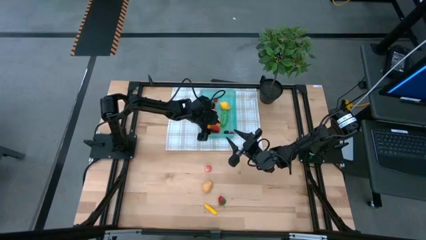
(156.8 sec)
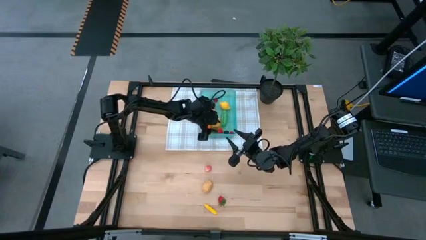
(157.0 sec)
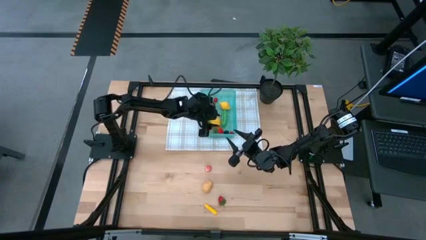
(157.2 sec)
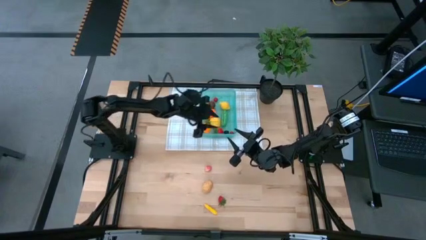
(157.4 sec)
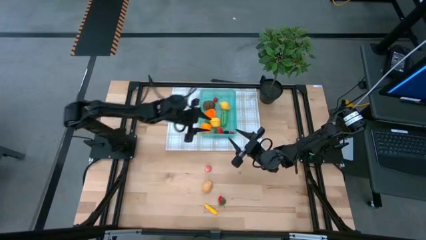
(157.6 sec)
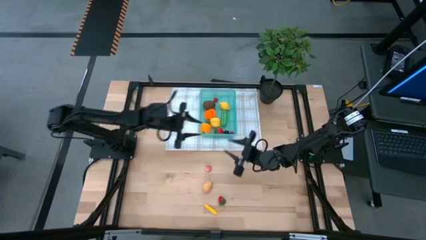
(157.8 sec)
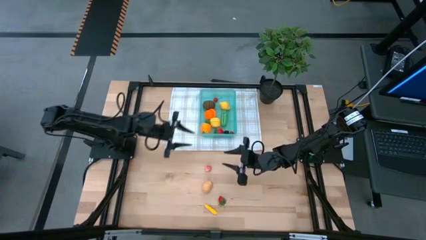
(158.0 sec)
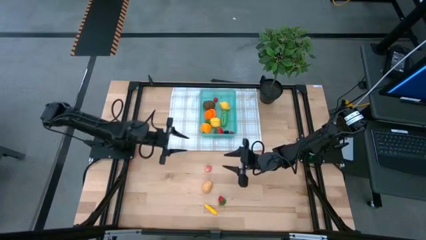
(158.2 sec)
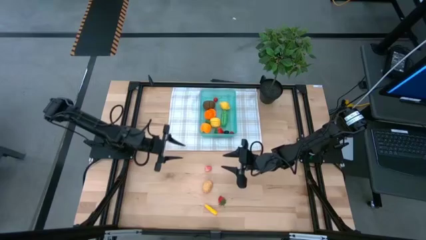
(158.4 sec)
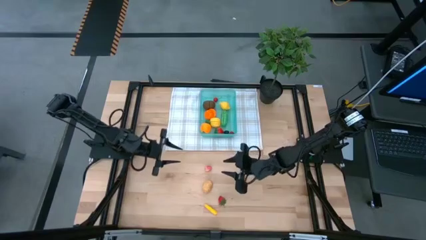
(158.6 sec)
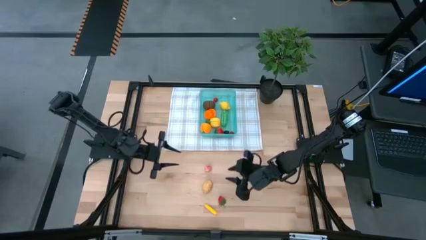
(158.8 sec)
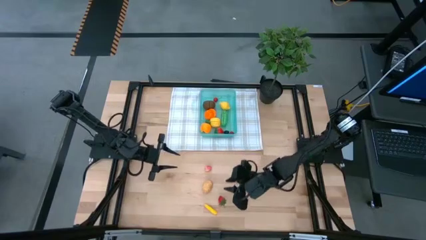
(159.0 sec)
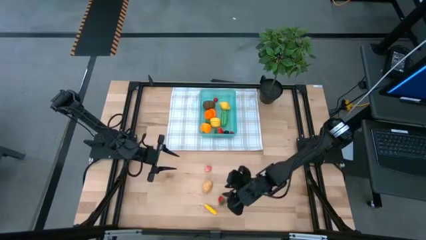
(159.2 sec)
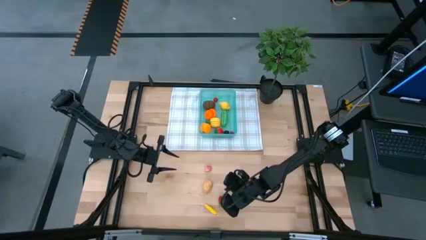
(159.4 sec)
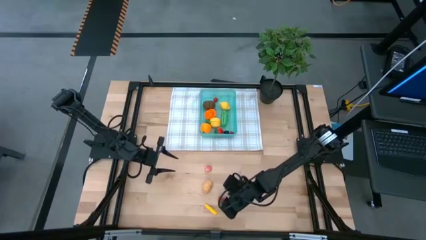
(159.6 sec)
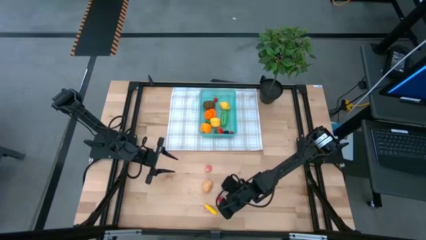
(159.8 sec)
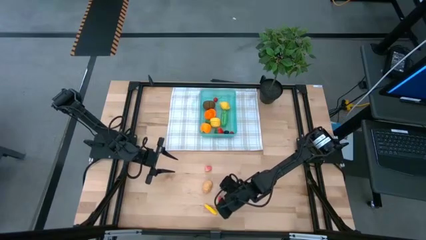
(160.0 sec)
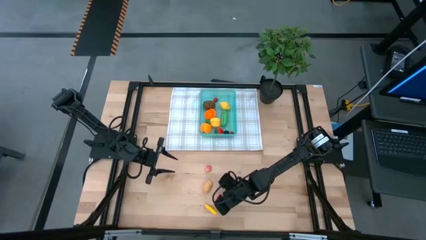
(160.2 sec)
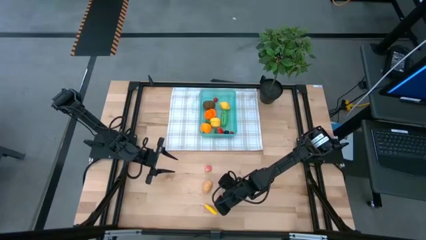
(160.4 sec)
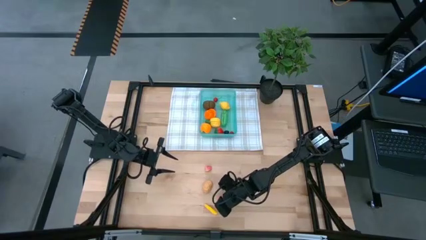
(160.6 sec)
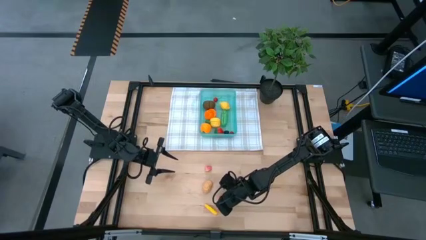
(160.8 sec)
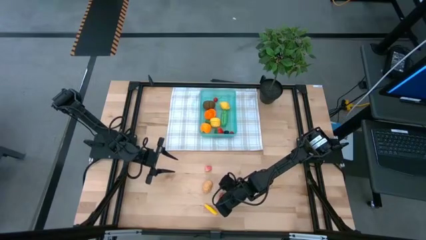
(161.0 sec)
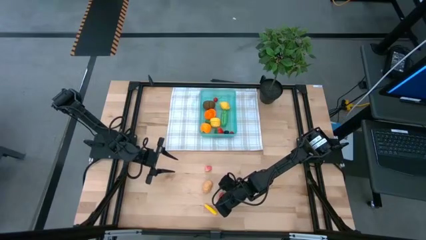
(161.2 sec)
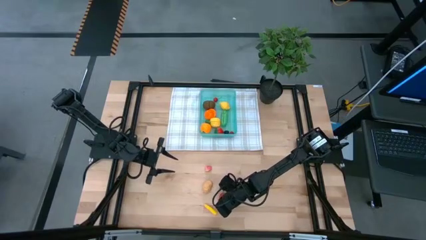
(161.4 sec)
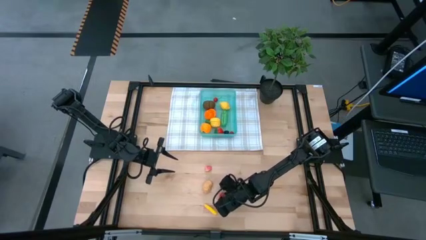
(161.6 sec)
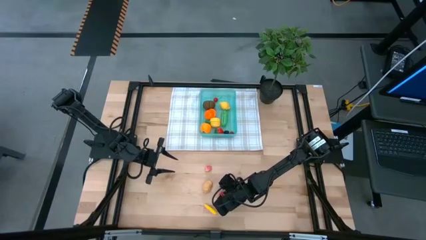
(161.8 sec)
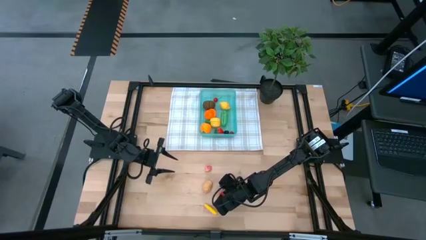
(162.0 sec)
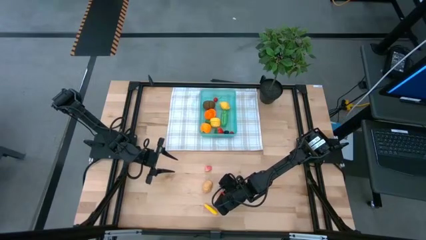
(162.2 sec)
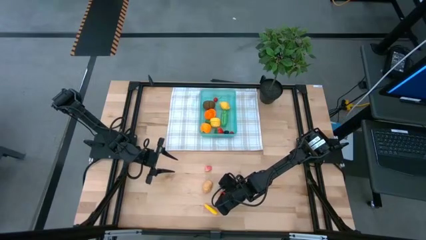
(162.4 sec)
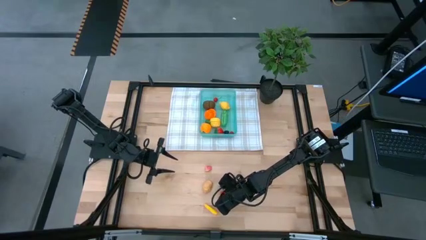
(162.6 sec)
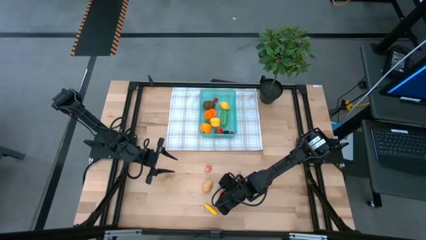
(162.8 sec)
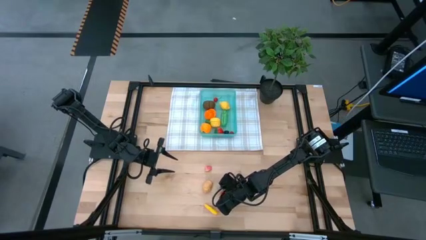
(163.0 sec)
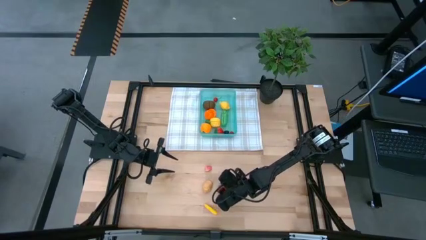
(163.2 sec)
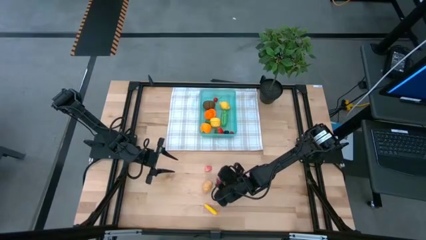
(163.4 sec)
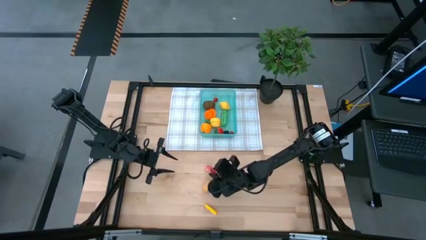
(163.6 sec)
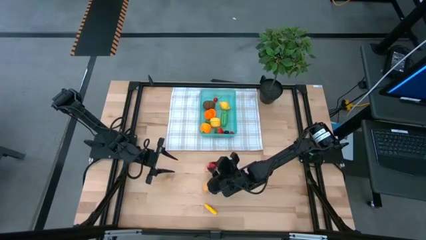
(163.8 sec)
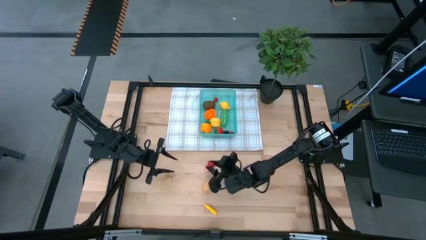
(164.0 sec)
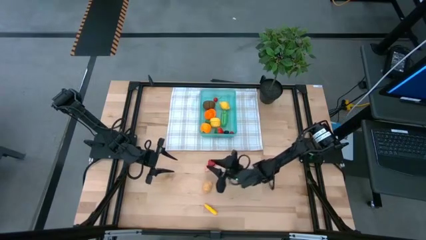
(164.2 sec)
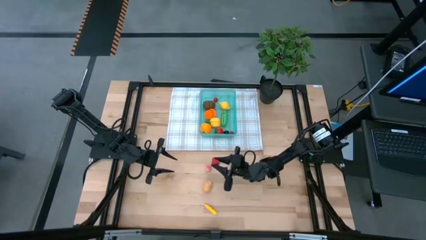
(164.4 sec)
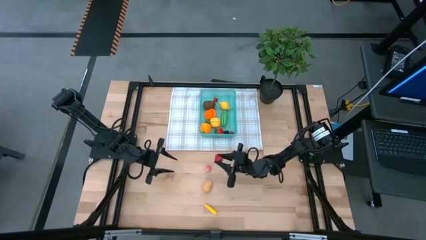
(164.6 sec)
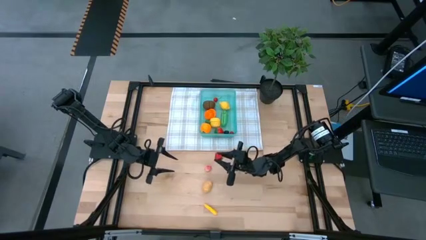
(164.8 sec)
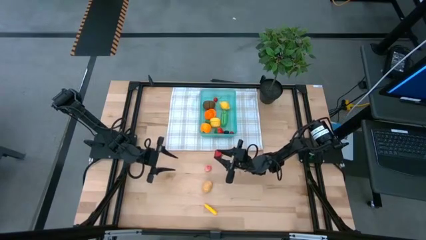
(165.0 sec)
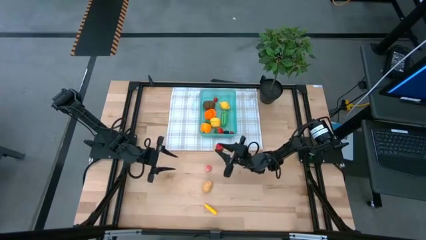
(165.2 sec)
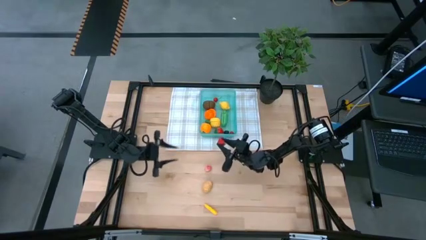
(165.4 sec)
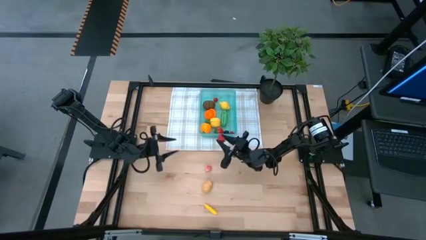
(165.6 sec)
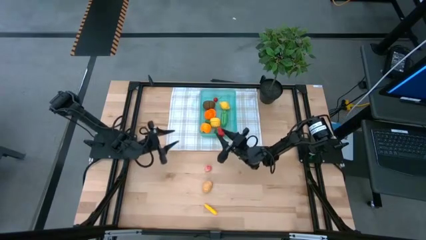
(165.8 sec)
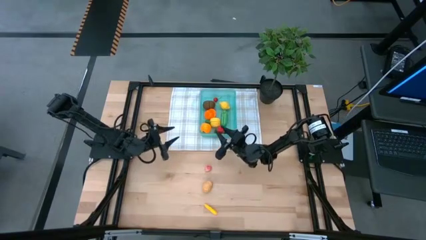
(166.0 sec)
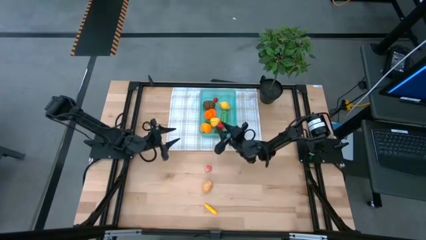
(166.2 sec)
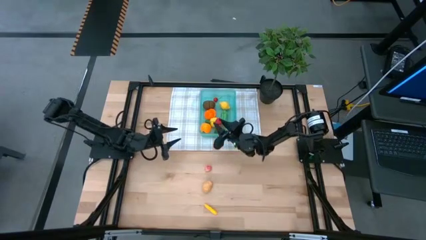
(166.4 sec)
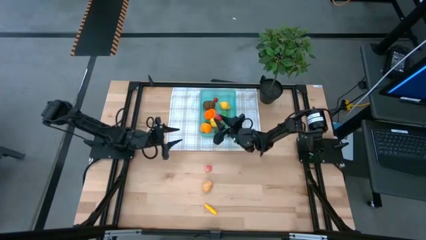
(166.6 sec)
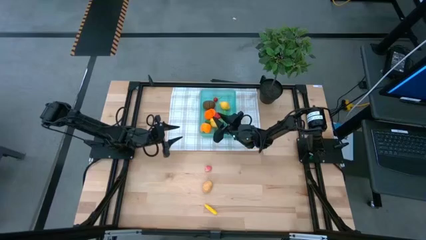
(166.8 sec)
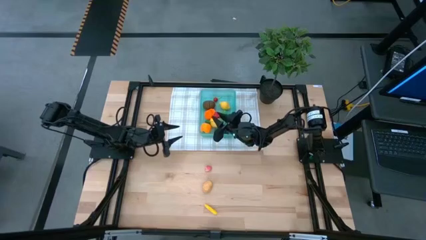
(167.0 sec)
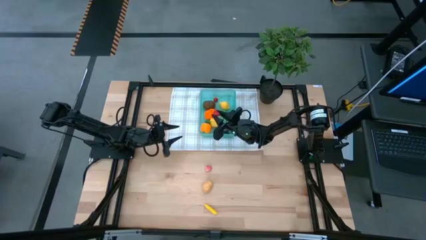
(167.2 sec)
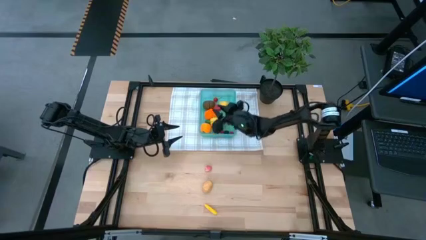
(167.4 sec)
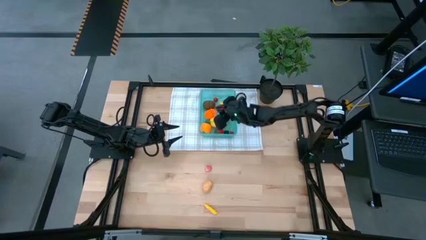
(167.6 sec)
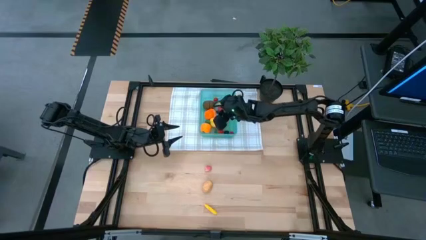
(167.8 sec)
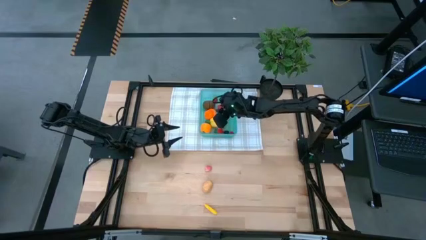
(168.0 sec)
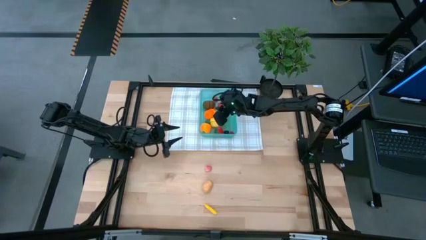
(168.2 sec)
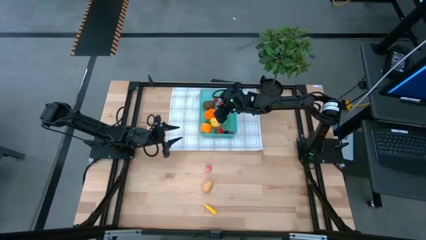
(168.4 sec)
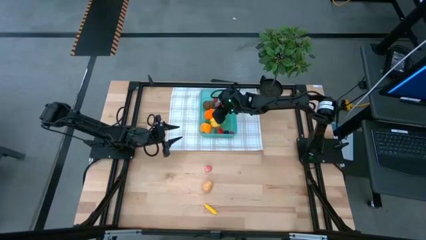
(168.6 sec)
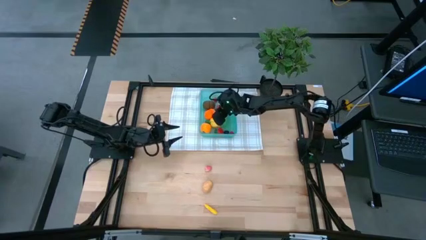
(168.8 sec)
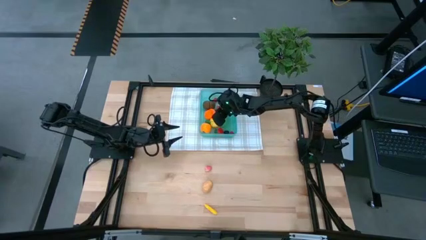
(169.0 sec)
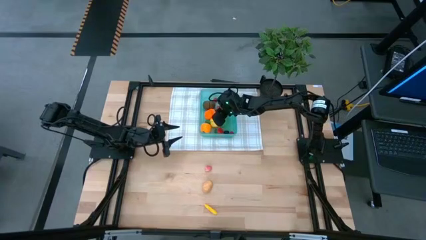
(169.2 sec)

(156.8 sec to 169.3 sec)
Task: Pick and placing Produce into tupperware
Put the red strawberry into the green bin

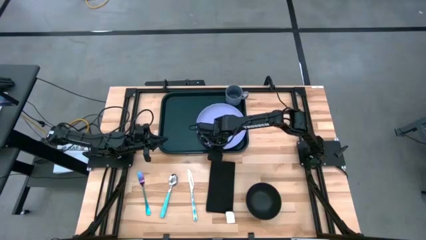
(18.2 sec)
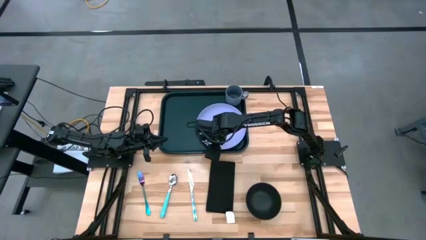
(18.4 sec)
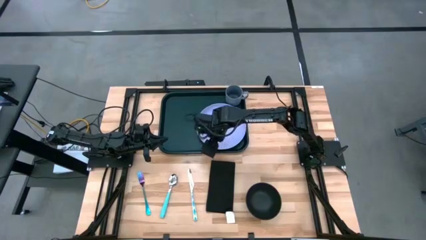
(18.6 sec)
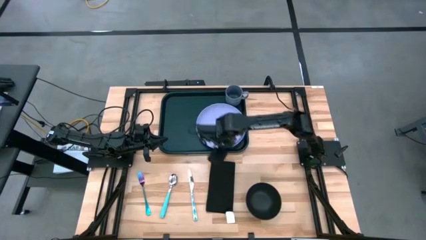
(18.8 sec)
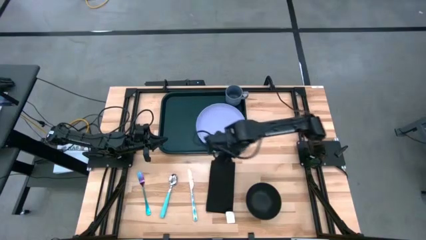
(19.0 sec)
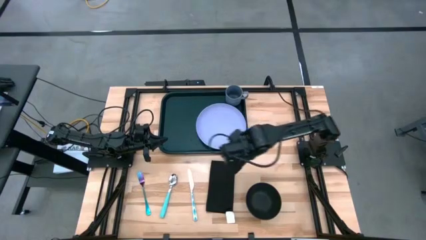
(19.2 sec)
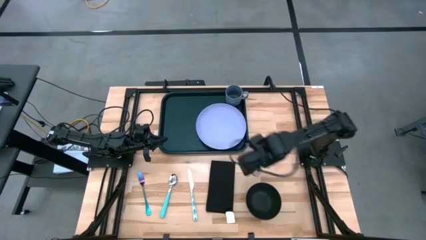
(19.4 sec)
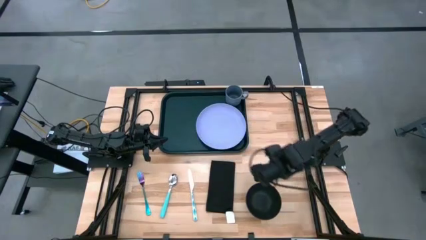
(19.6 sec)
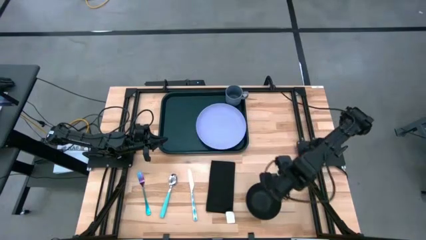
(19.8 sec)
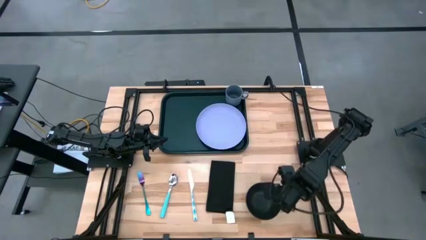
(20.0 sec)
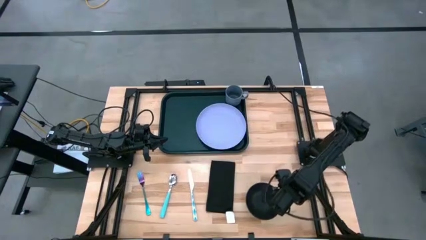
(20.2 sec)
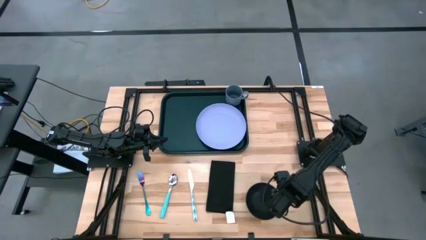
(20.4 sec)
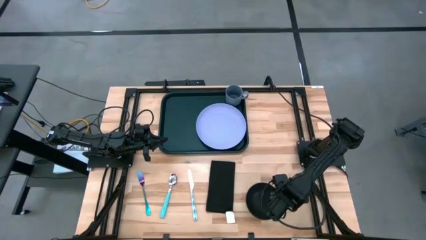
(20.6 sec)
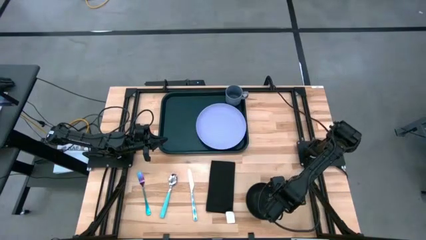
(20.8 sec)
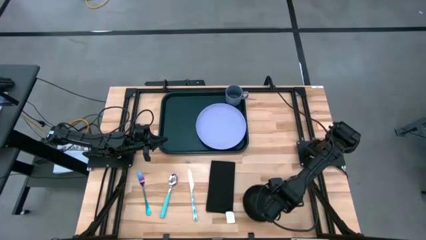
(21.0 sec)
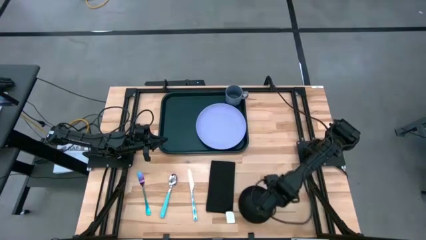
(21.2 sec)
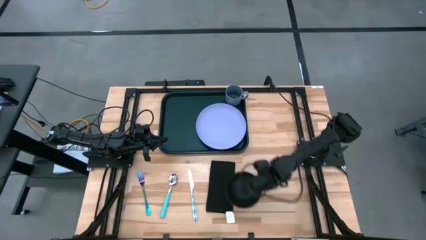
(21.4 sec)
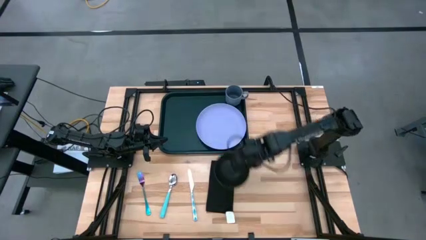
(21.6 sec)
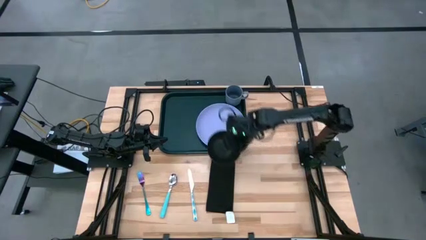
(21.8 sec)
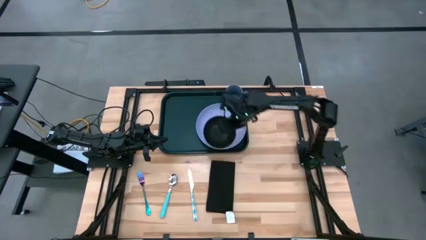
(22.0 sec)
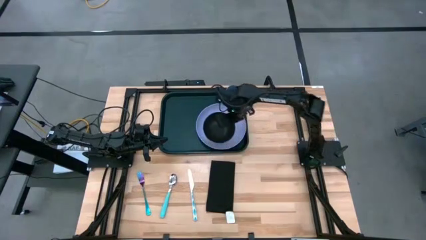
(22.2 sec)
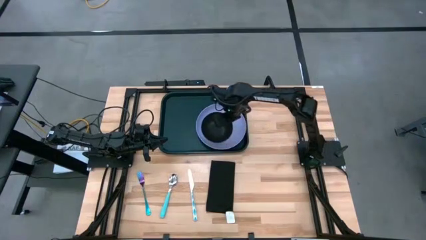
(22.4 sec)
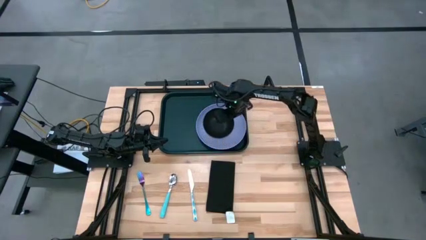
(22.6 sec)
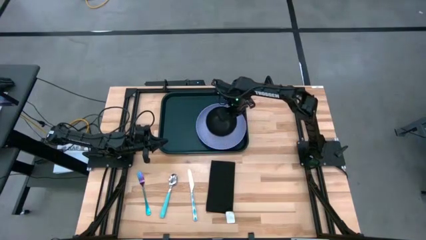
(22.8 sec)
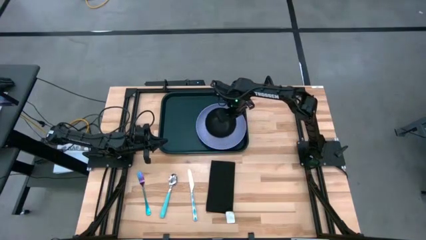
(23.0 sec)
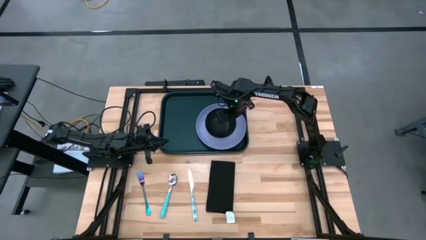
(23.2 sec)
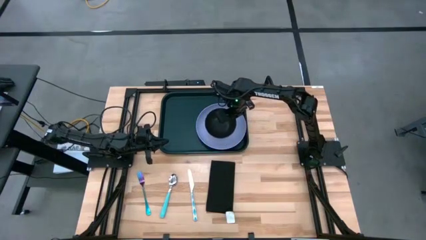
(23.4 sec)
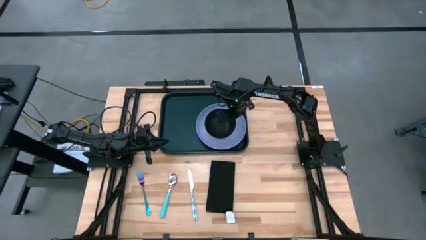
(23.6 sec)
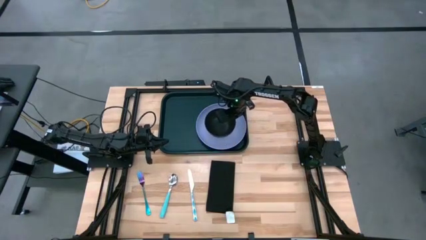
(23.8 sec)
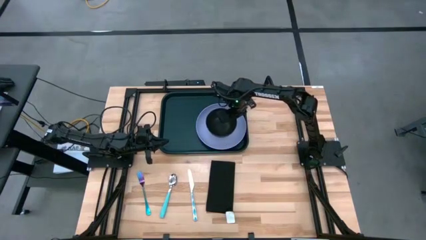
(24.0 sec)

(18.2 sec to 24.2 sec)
Task: Set up tray
Put the black bowl on top of the violet plate on the black tray
